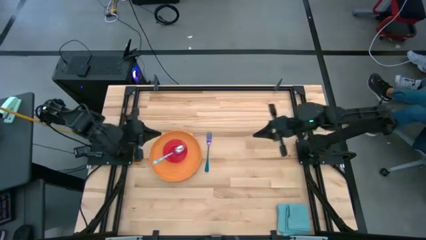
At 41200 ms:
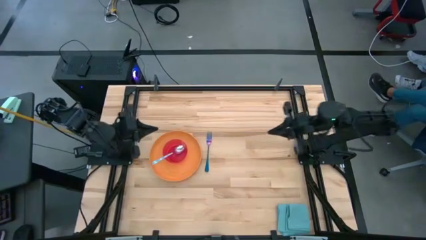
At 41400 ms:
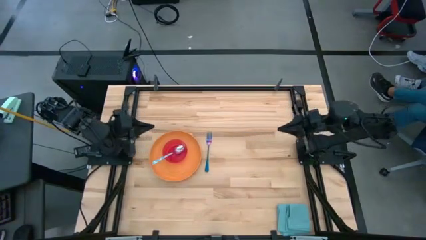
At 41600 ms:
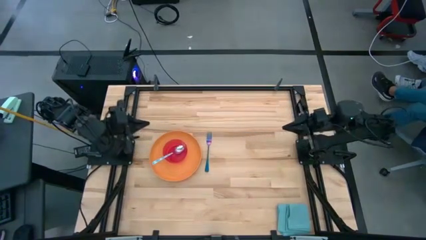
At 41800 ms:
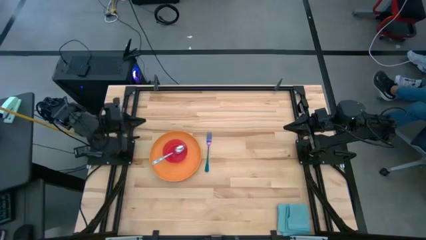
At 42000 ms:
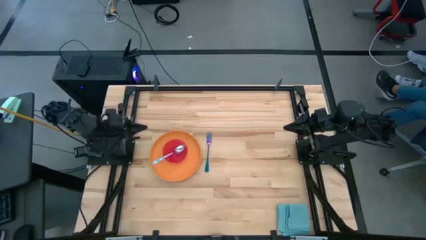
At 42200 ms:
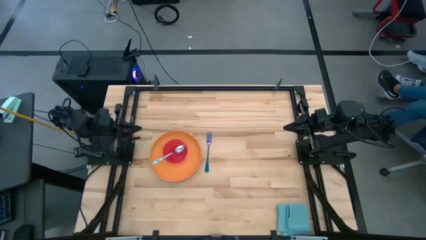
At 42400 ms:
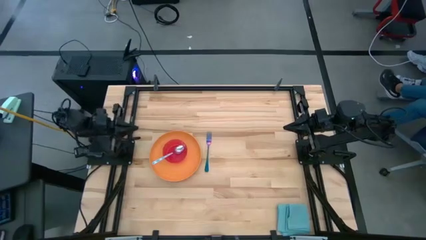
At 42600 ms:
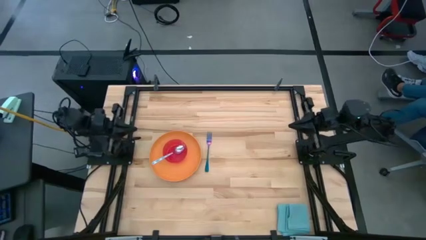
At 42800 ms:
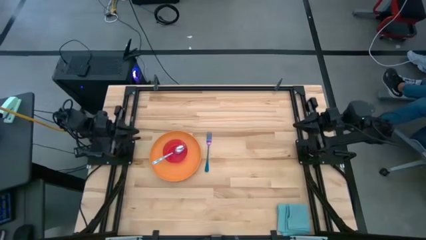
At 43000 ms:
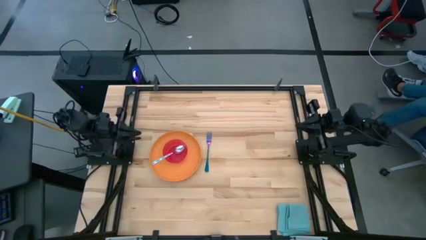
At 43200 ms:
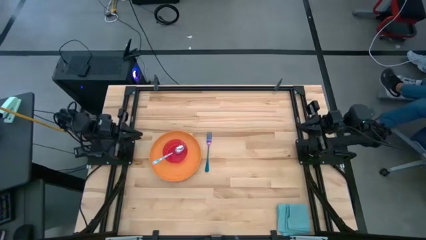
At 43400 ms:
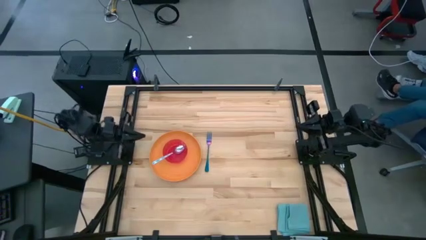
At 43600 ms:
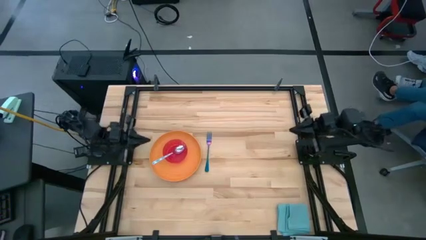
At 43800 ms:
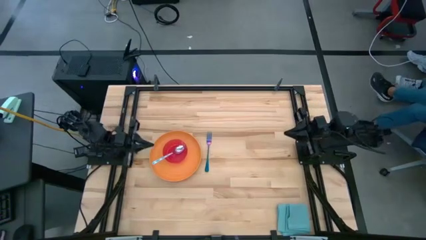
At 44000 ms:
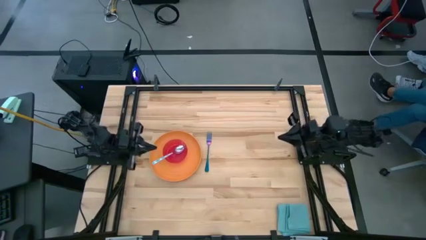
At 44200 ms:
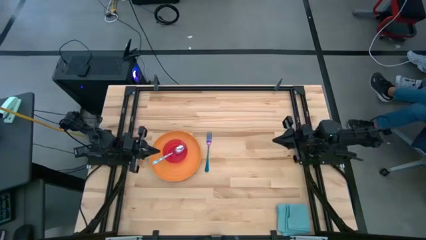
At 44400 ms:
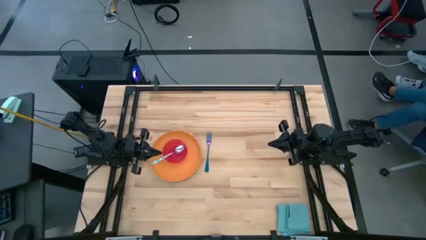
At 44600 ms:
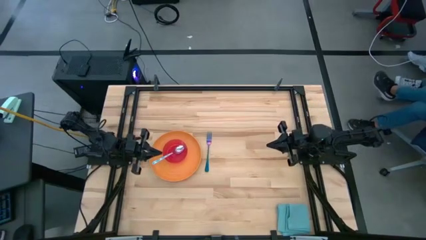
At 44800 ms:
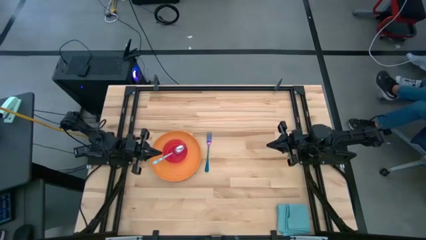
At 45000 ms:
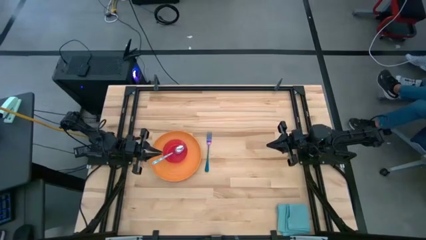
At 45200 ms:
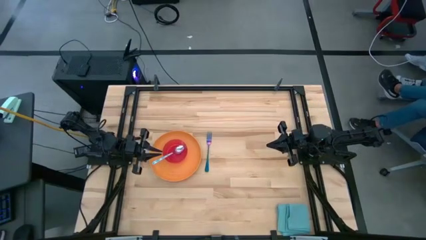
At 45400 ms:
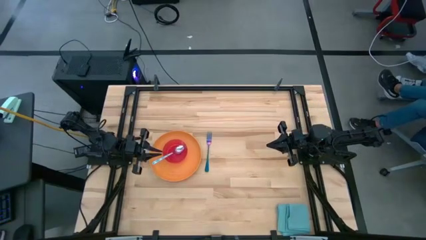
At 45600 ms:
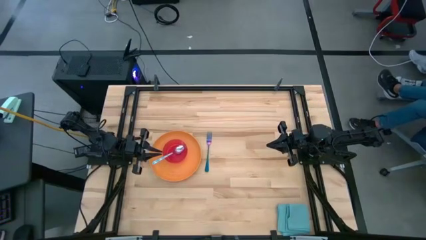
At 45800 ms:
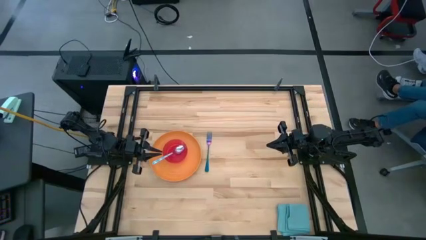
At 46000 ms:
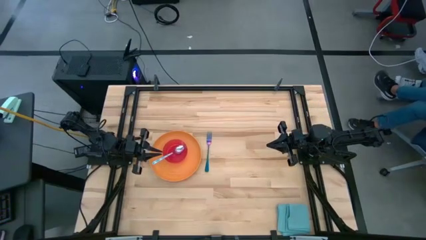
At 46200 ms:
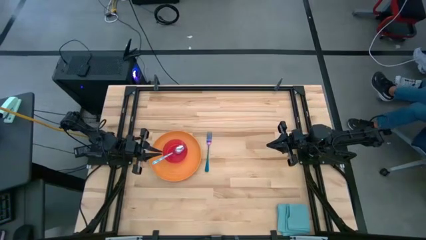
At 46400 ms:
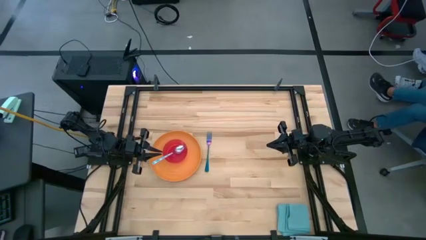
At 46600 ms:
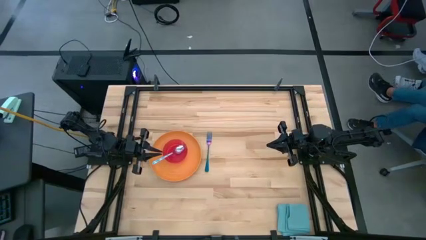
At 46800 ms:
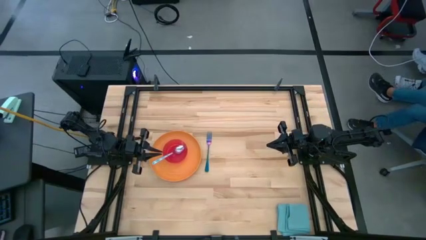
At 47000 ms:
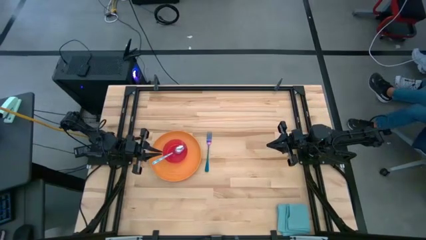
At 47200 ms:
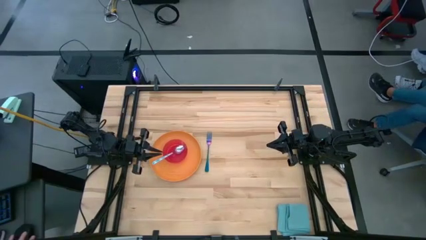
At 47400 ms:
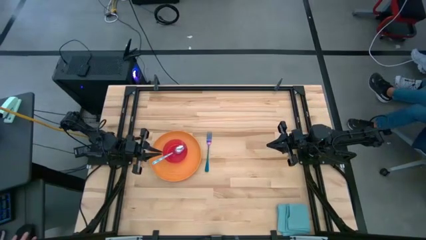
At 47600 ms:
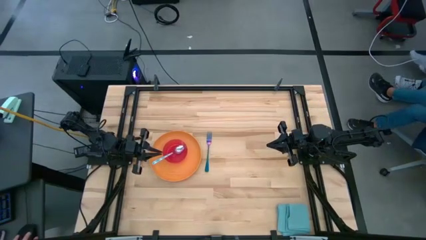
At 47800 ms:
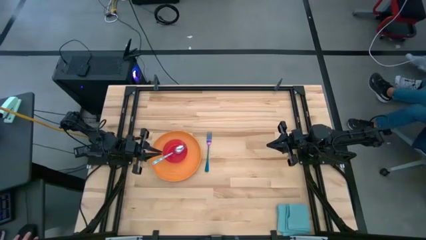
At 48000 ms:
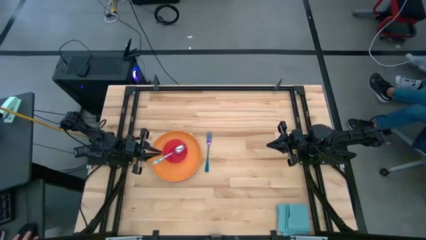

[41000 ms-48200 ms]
Task: Set table place
Return to Home Position

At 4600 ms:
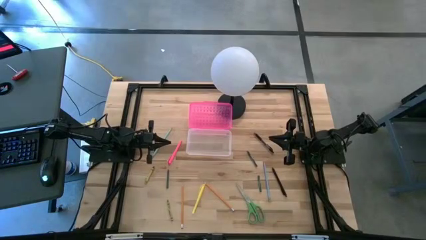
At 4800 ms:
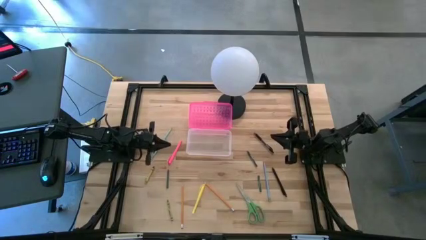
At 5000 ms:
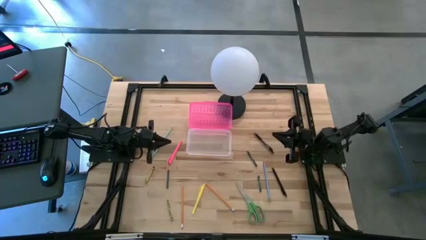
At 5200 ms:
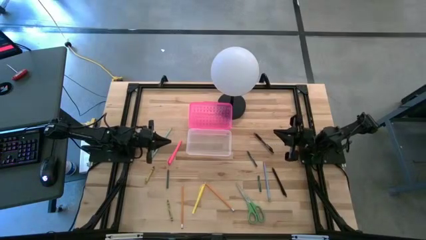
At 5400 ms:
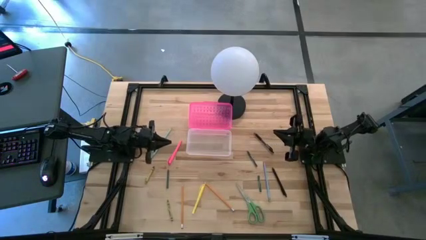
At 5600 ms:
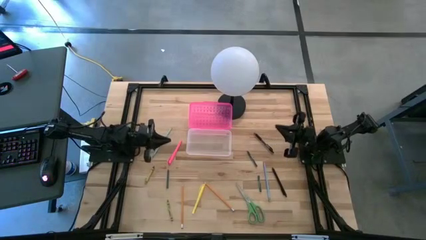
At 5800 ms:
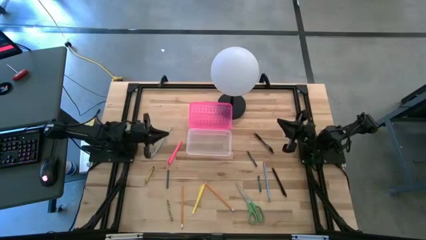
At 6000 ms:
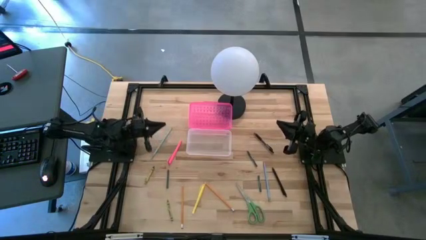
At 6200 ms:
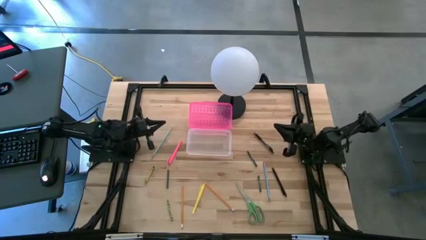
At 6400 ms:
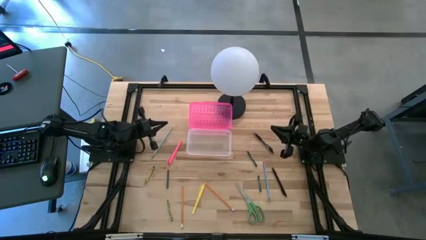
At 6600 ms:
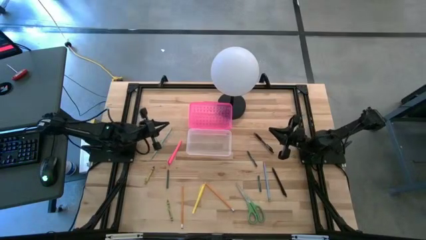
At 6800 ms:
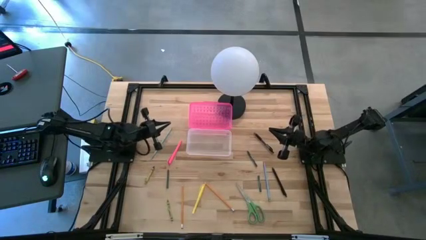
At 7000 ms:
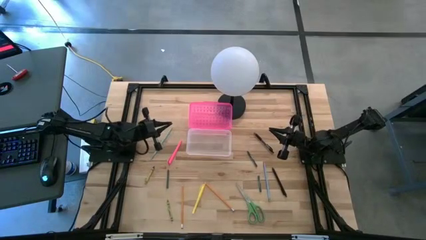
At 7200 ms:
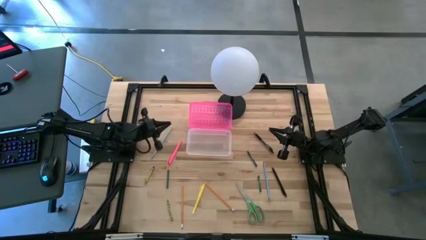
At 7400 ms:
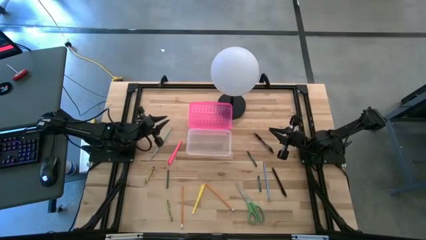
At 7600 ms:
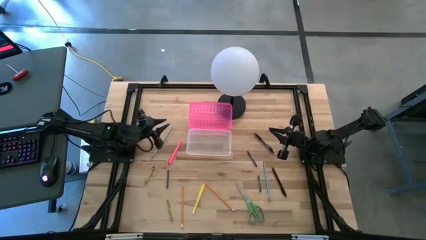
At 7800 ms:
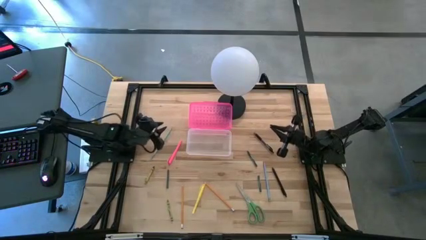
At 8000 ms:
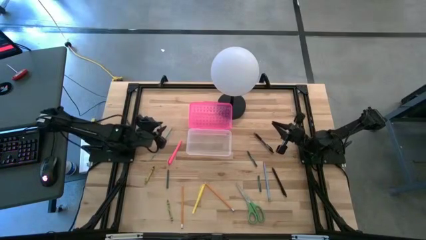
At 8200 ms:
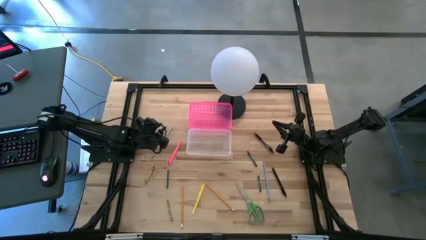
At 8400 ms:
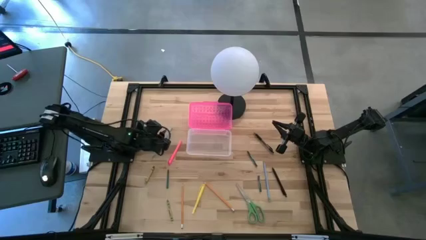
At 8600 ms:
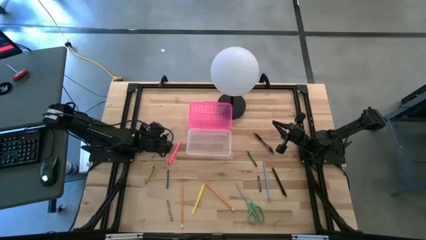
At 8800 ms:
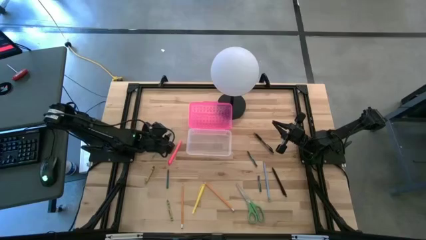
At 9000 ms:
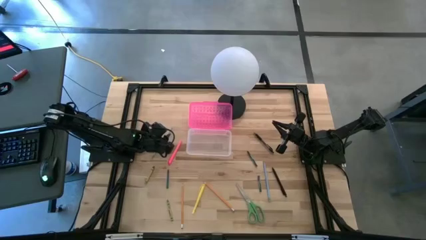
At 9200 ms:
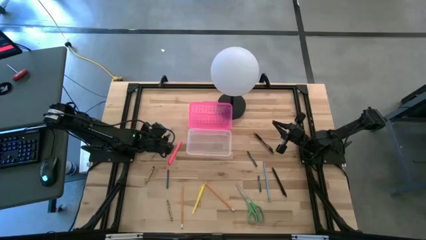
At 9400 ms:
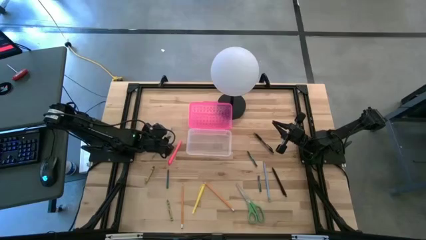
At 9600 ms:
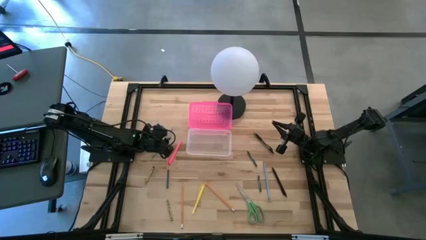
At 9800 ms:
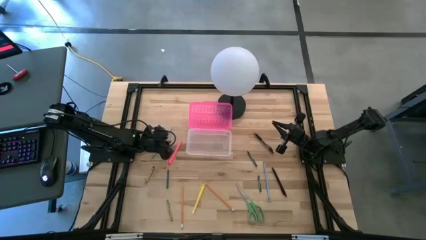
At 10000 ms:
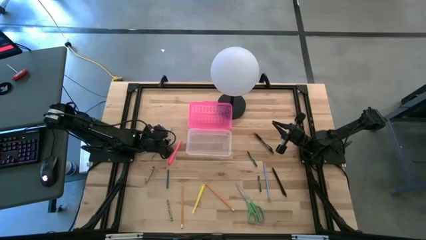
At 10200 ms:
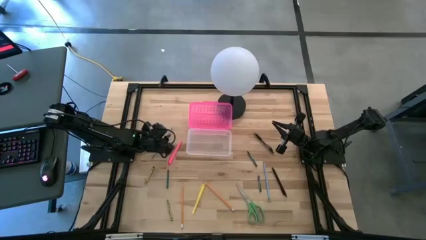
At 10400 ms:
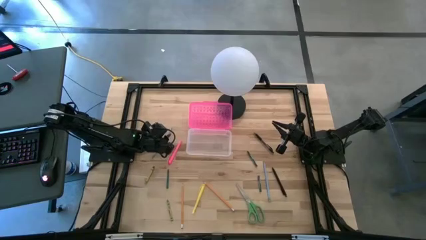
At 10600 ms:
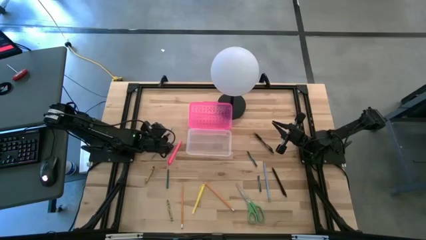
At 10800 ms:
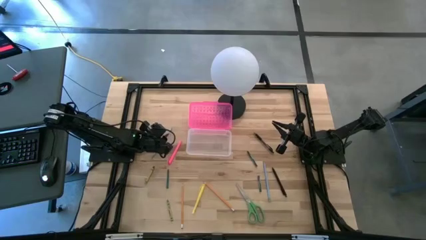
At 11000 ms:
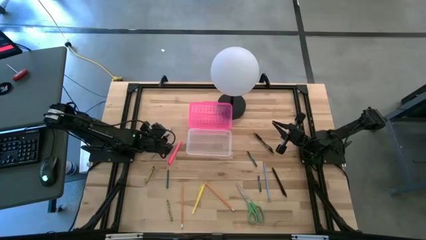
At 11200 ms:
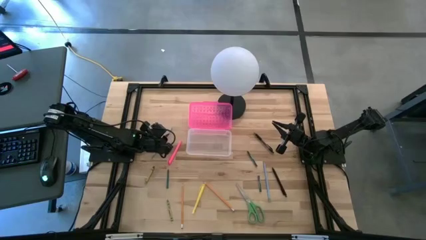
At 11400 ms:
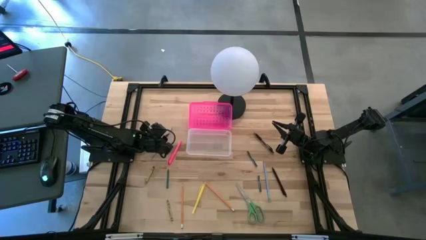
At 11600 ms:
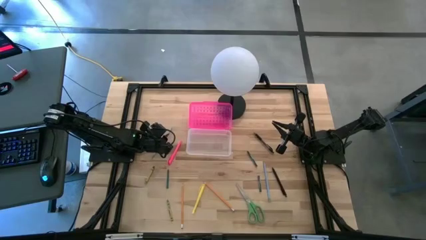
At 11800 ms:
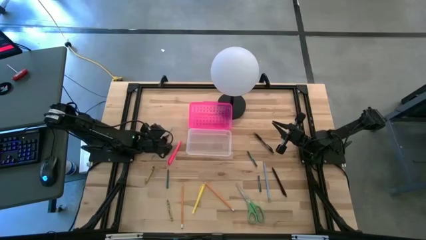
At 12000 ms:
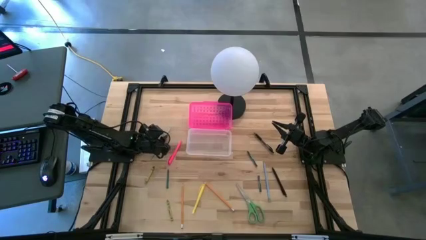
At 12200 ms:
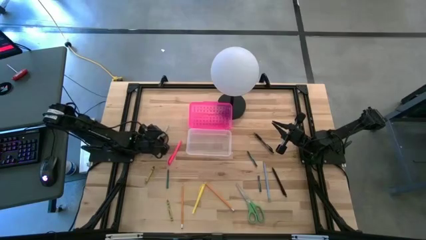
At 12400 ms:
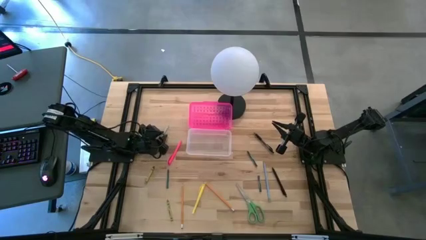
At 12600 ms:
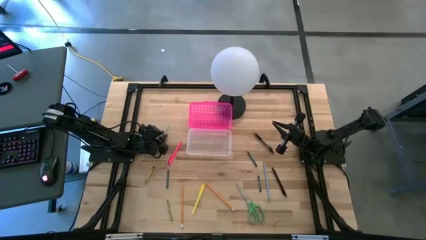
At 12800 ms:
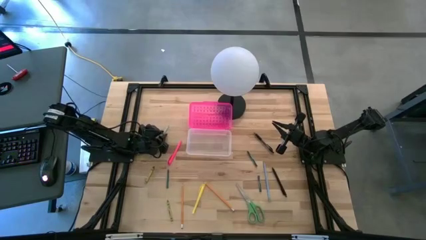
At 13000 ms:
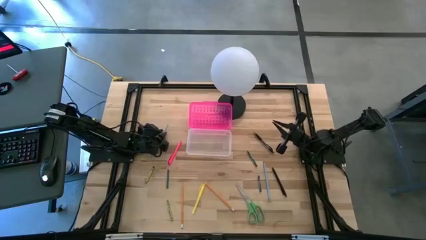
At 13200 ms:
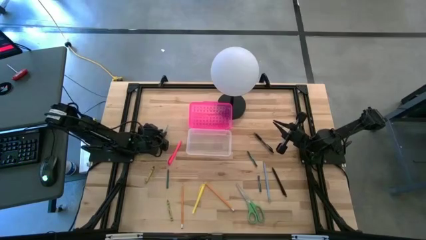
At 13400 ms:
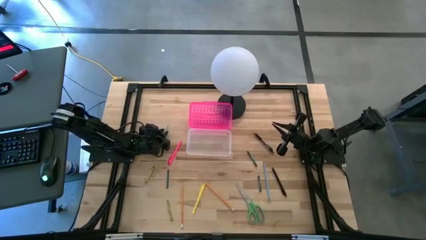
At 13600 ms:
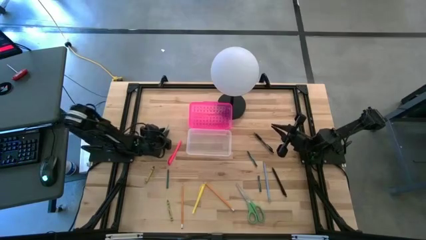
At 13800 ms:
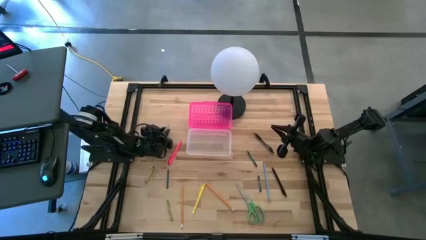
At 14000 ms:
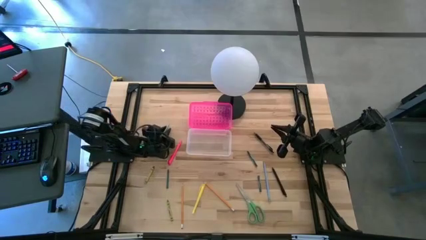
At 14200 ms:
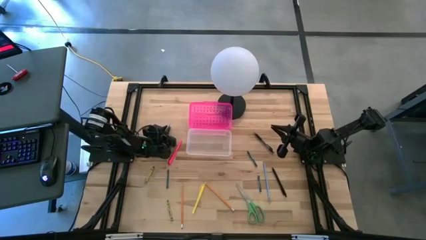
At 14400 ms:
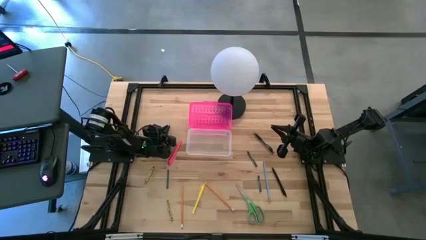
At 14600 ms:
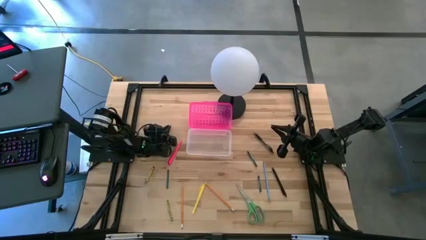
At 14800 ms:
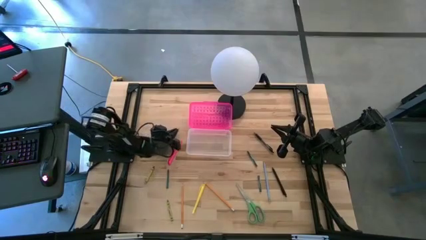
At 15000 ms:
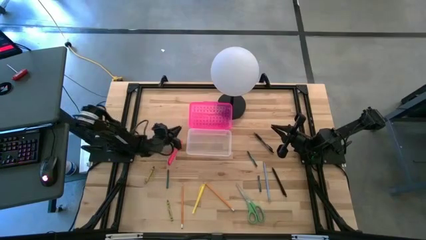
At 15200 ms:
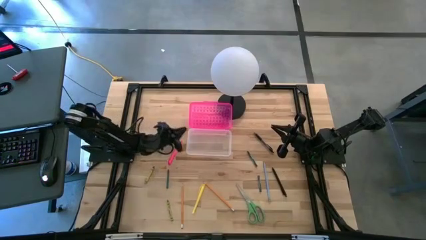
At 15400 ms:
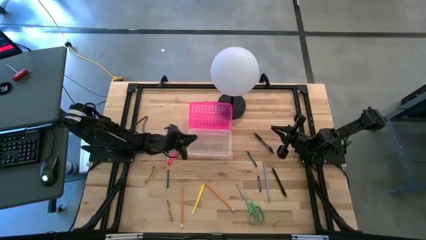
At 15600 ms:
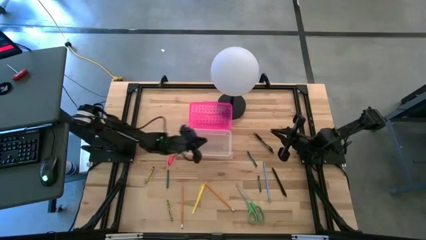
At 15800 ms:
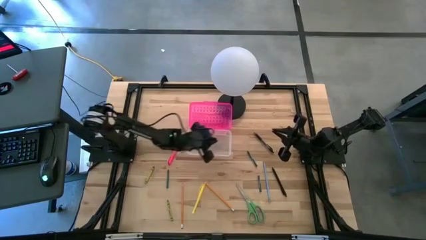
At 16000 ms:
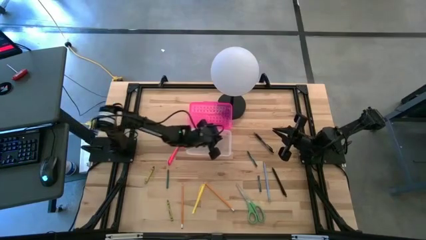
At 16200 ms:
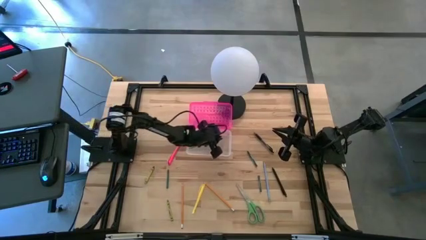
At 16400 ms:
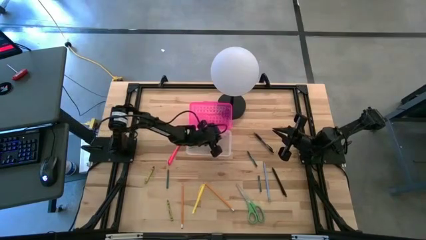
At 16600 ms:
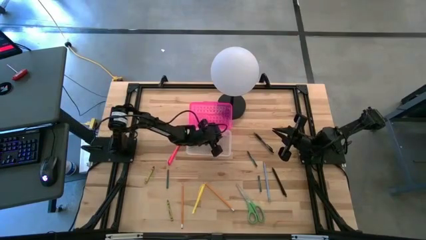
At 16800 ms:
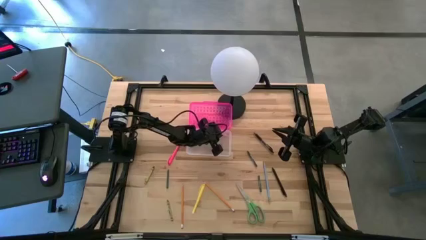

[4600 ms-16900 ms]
Task: Pick & place school supplies into a supply box
Put the light blue pencil into the pink supply box
